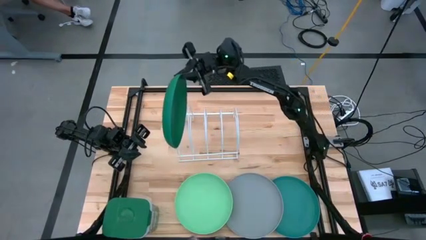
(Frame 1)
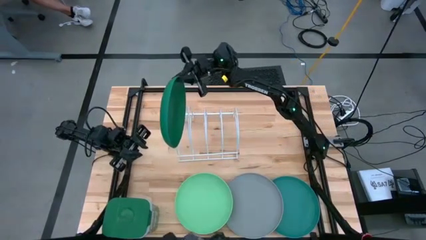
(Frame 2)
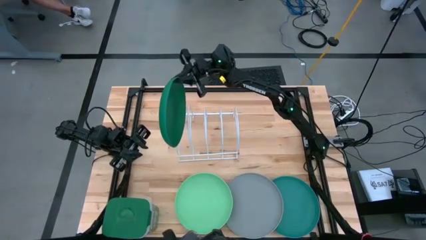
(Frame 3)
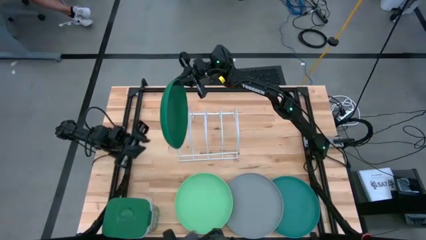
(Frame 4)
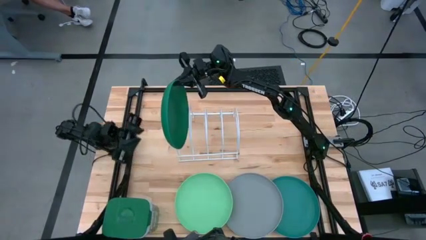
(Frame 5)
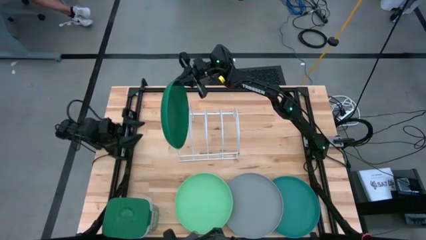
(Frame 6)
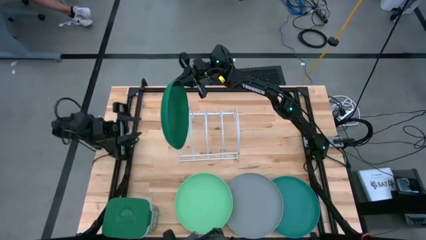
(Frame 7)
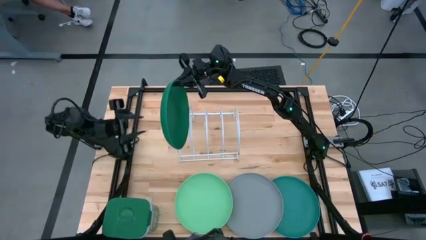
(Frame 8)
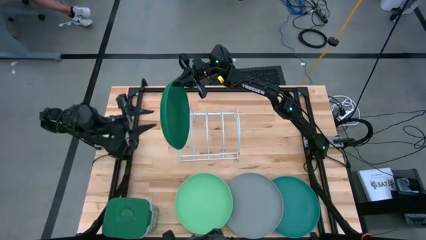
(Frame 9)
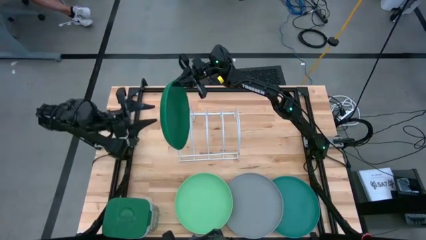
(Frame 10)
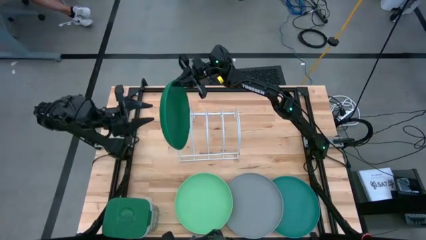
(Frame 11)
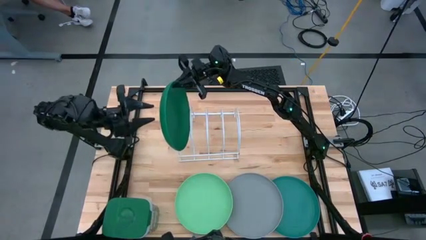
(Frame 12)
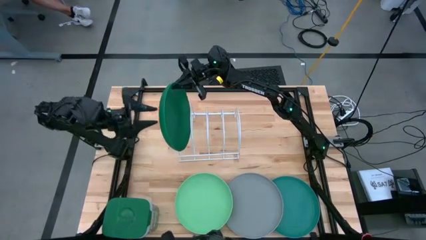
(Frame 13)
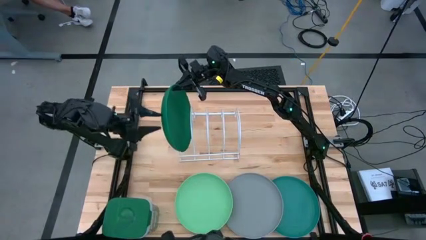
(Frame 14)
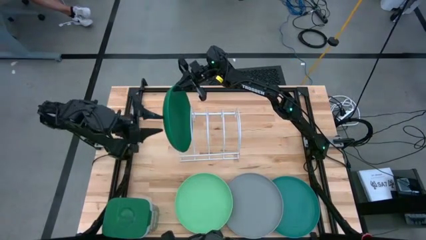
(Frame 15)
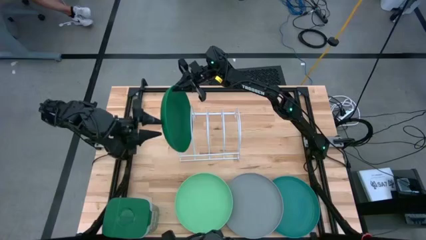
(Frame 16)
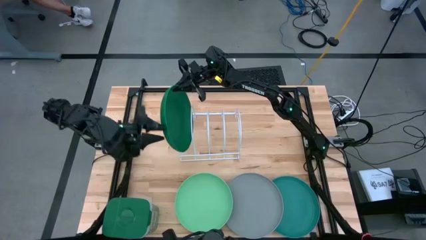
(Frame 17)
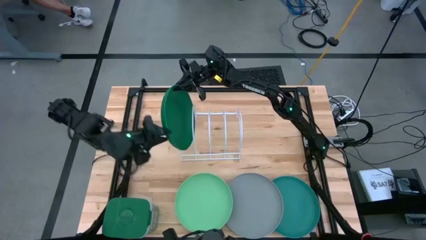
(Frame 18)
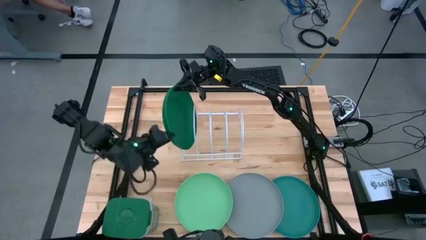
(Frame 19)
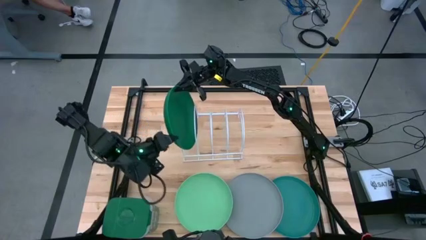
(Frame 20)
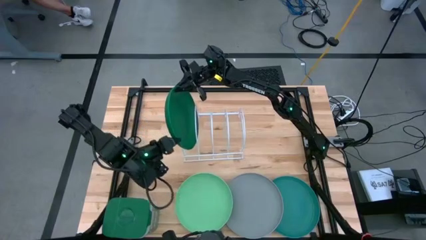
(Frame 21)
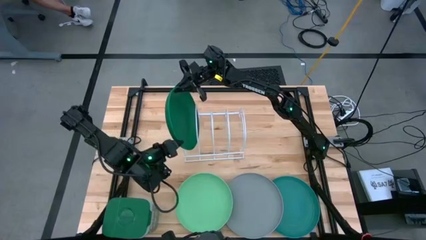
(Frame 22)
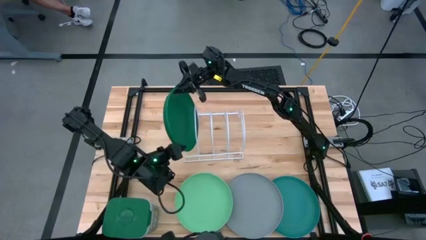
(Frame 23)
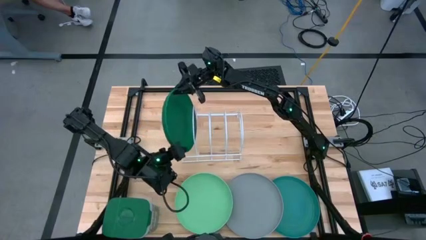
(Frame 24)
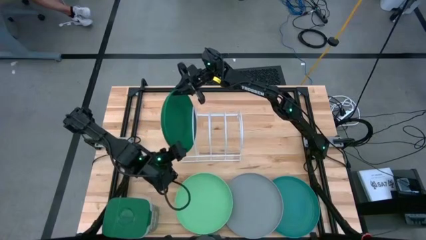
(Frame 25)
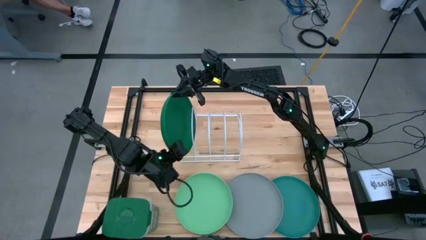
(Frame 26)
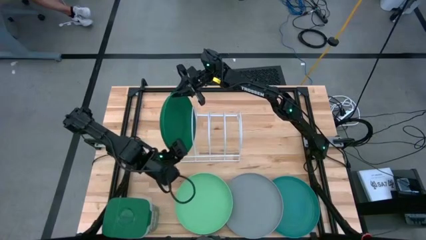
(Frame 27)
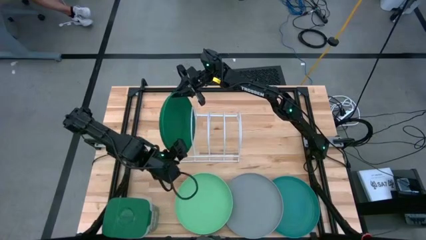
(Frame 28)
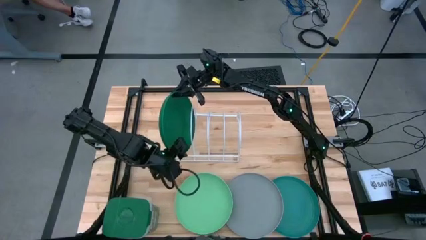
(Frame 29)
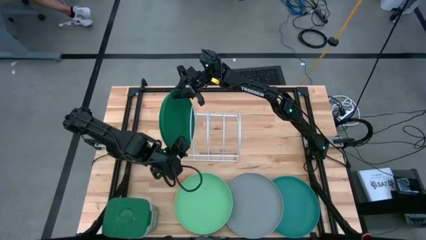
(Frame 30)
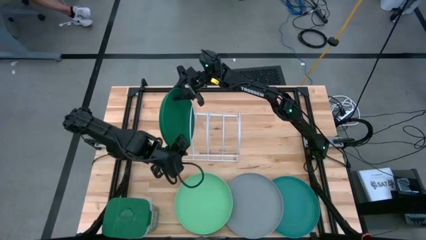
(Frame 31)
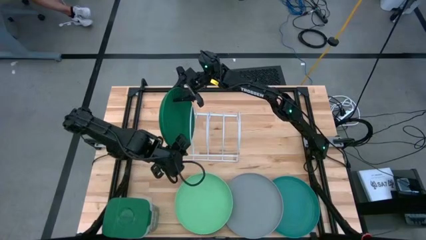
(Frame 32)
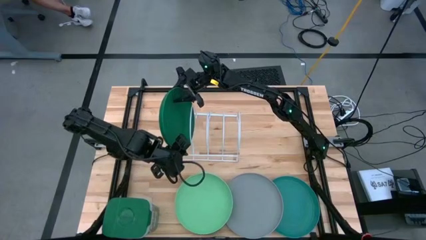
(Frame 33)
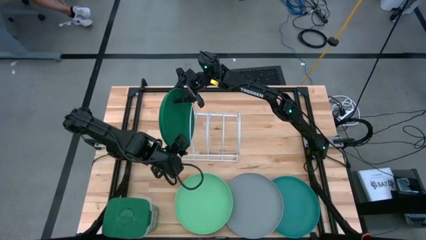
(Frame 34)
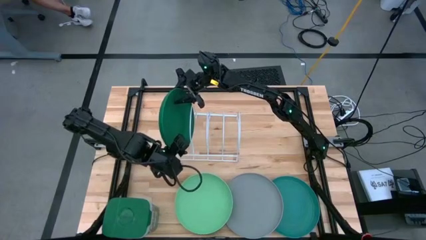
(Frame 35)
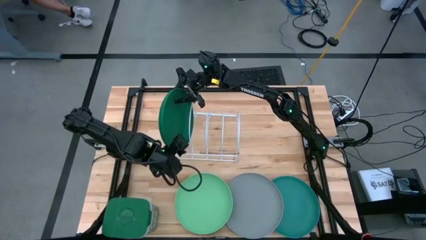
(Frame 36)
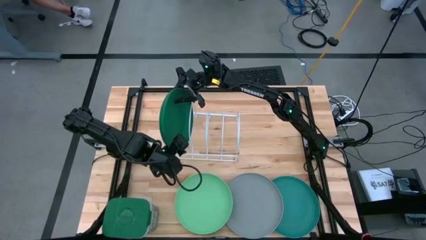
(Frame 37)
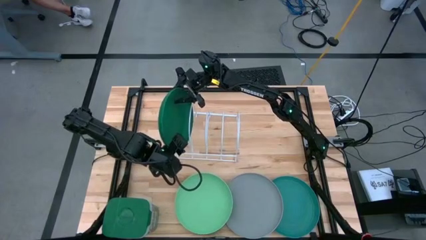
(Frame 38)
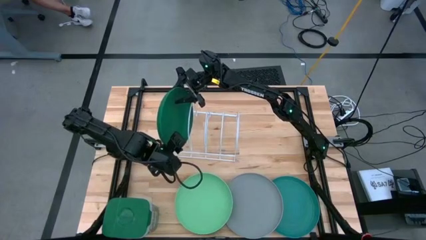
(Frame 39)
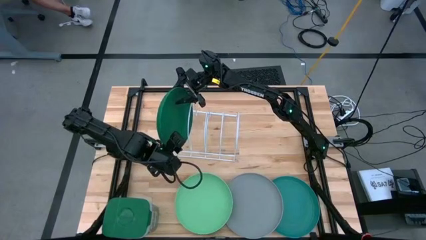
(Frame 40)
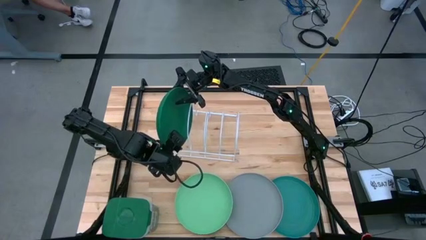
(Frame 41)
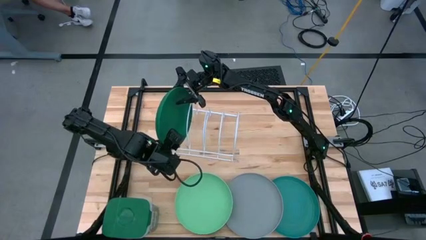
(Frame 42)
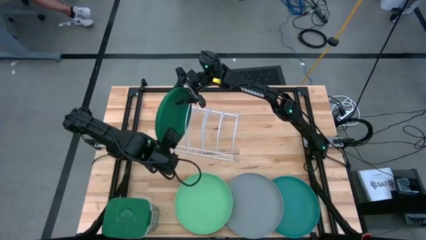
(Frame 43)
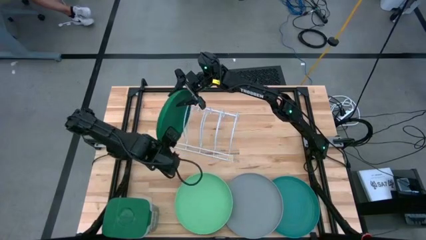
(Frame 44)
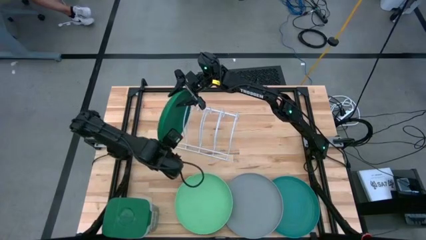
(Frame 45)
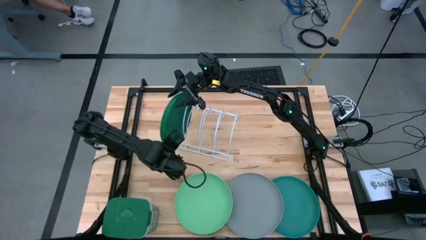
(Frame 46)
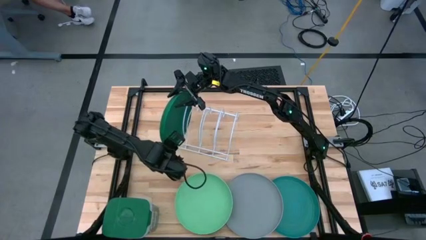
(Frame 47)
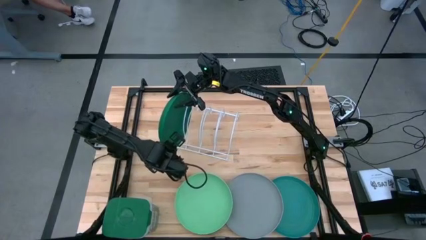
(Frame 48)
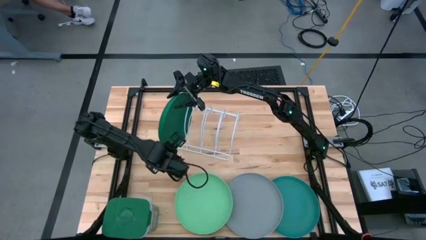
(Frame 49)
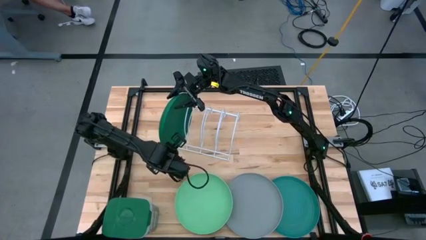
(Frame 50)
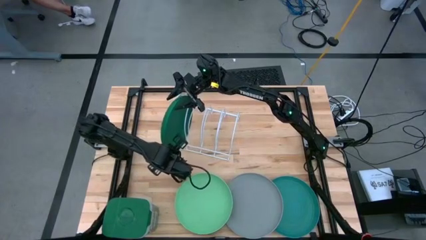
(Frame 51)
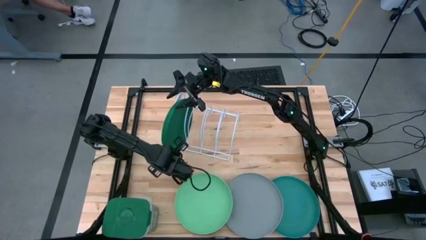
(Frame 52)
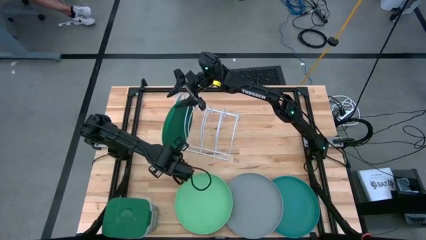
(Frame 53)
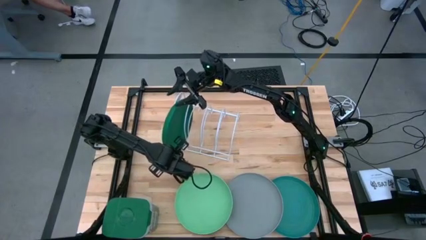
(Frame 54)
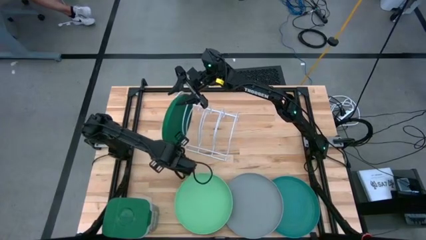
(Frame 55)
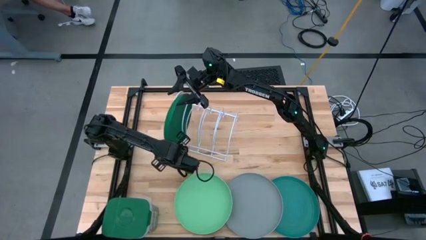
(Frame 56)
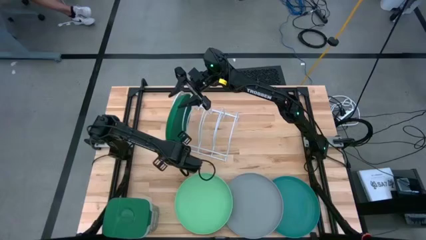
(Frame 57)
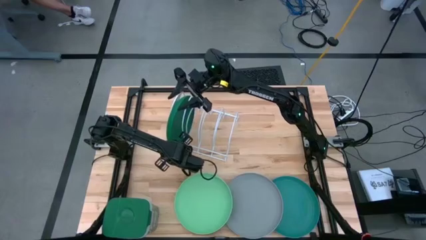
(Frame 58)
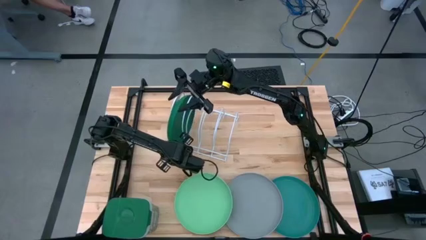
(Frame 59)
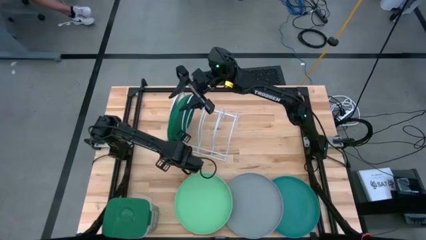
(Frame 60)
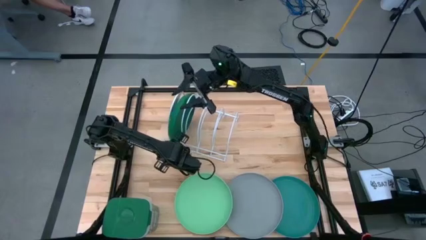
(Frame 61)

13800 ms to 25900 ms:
Task: Sort dishes
Put the green plate into the white dish rack
